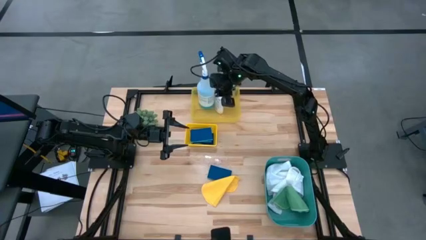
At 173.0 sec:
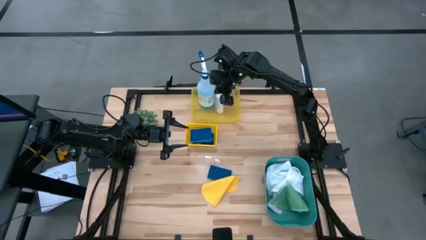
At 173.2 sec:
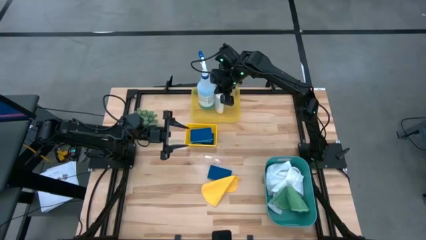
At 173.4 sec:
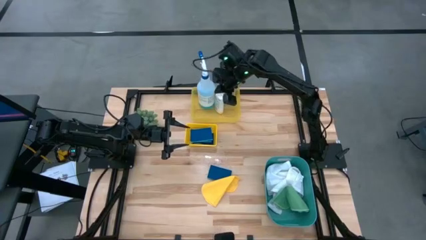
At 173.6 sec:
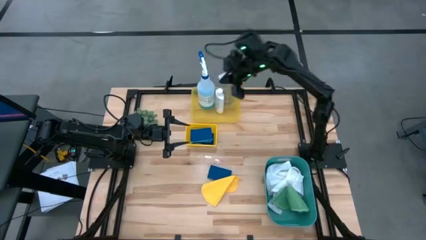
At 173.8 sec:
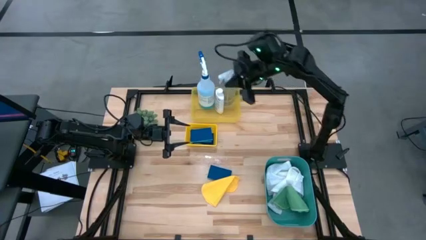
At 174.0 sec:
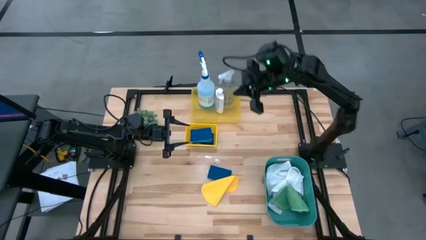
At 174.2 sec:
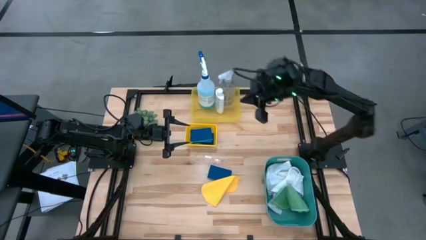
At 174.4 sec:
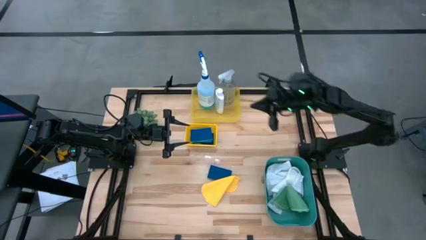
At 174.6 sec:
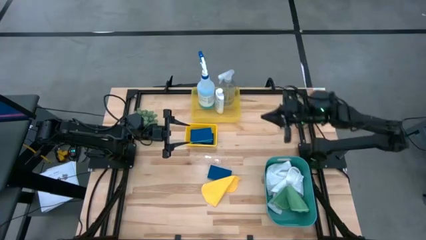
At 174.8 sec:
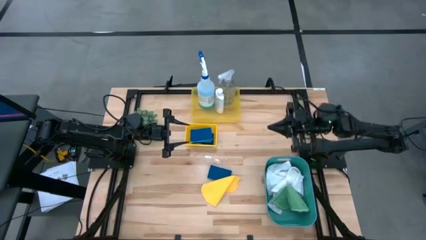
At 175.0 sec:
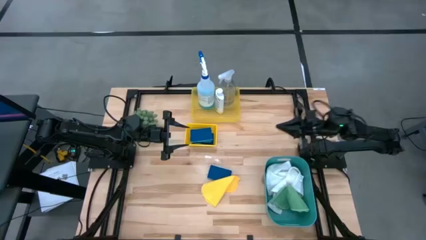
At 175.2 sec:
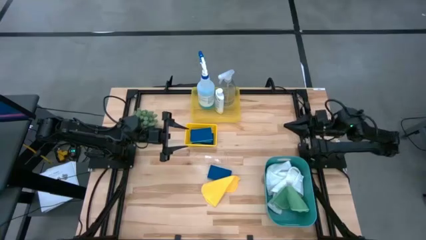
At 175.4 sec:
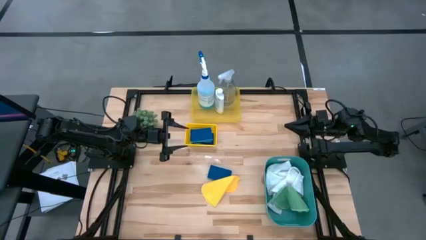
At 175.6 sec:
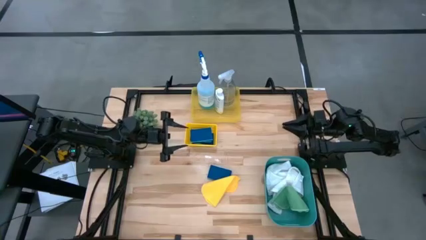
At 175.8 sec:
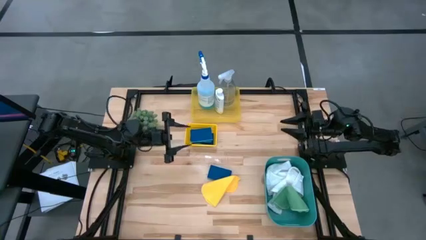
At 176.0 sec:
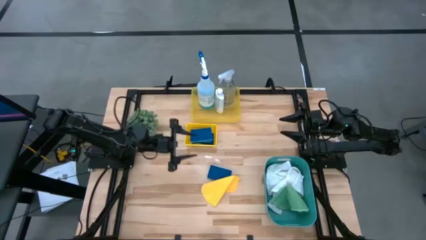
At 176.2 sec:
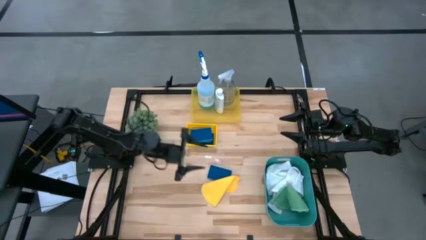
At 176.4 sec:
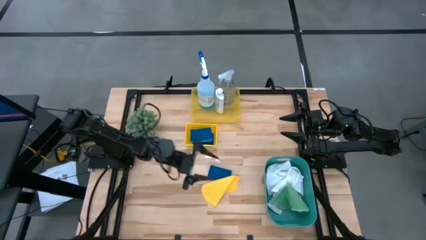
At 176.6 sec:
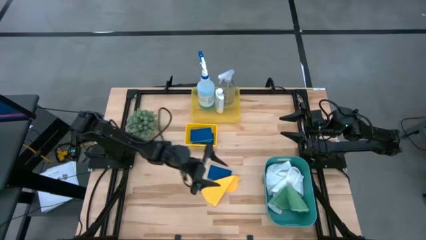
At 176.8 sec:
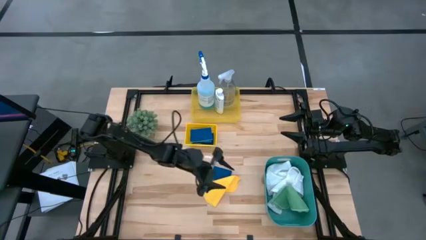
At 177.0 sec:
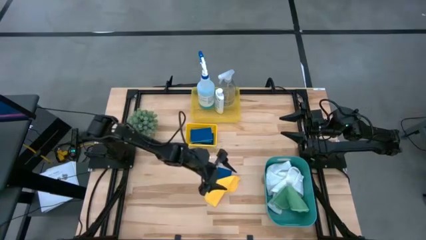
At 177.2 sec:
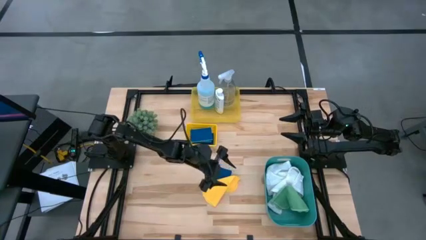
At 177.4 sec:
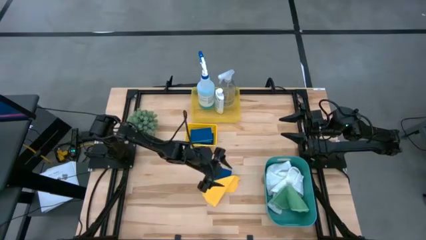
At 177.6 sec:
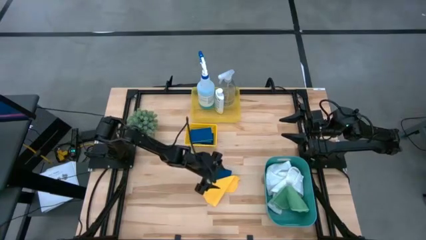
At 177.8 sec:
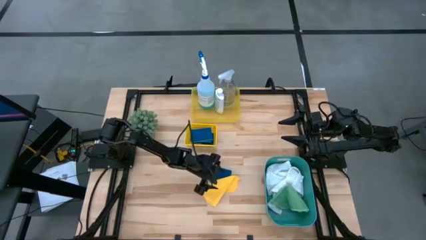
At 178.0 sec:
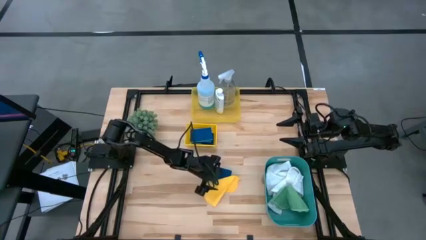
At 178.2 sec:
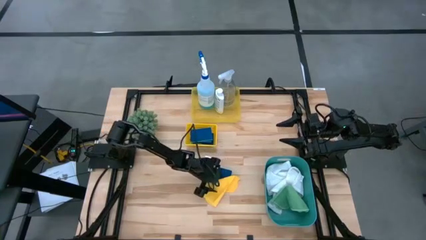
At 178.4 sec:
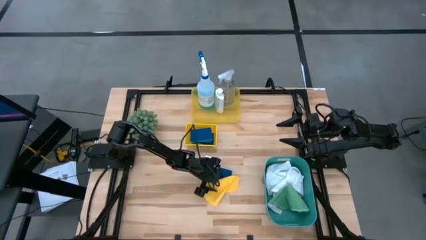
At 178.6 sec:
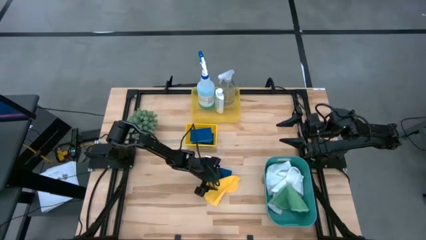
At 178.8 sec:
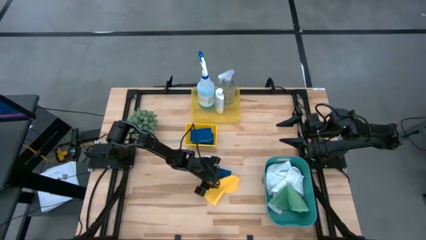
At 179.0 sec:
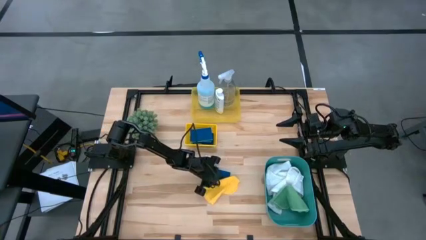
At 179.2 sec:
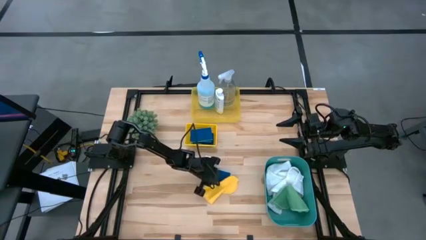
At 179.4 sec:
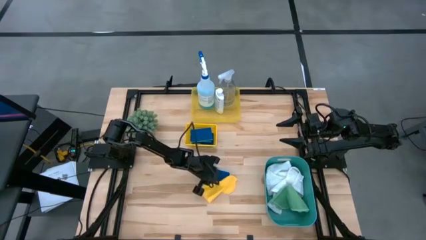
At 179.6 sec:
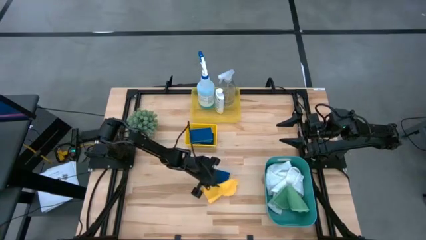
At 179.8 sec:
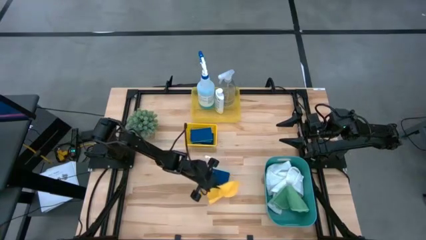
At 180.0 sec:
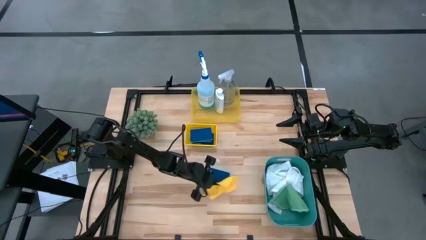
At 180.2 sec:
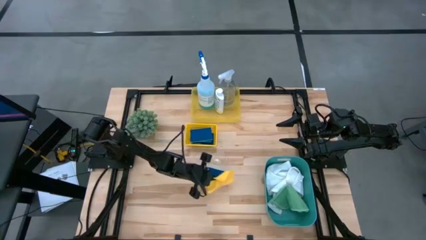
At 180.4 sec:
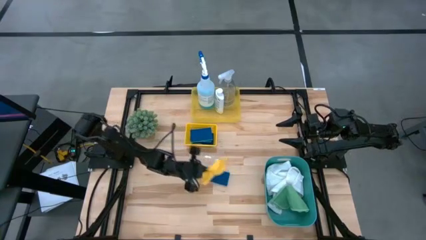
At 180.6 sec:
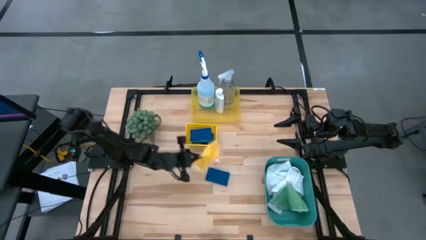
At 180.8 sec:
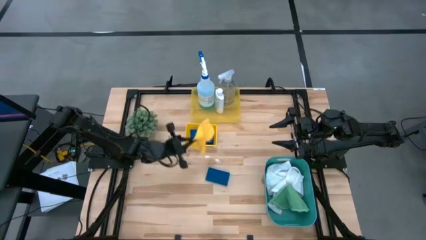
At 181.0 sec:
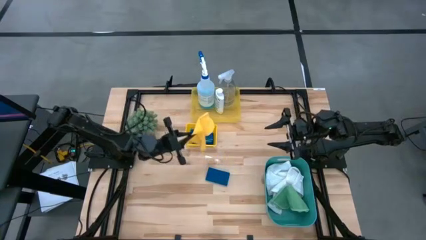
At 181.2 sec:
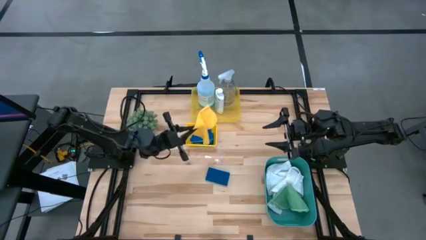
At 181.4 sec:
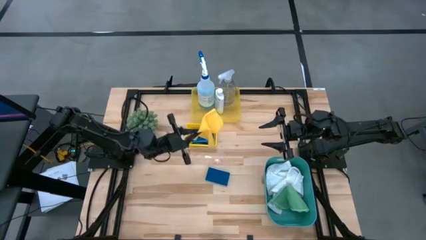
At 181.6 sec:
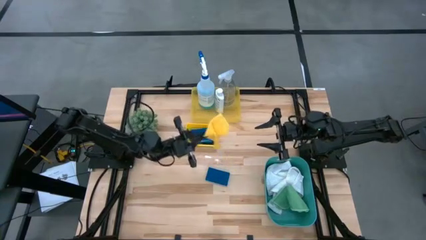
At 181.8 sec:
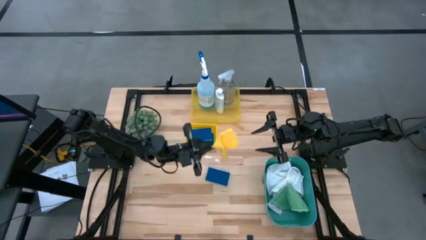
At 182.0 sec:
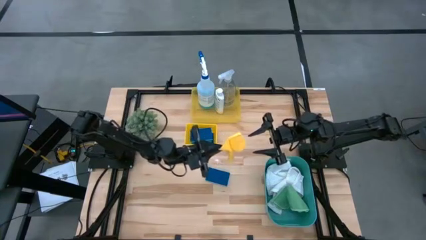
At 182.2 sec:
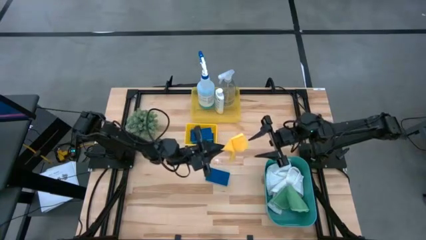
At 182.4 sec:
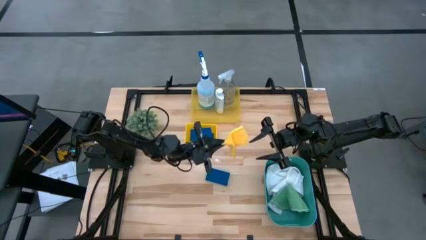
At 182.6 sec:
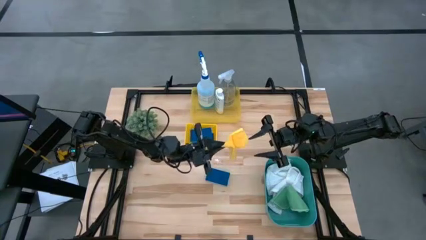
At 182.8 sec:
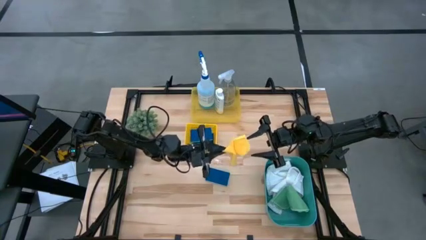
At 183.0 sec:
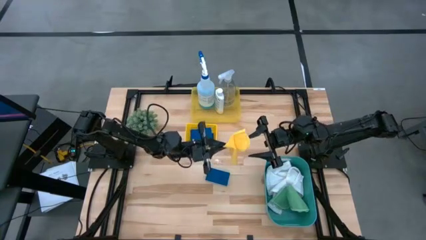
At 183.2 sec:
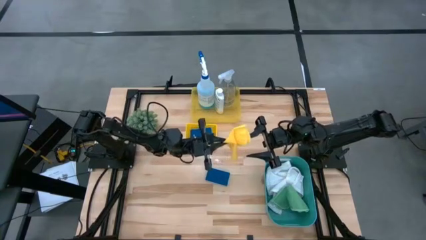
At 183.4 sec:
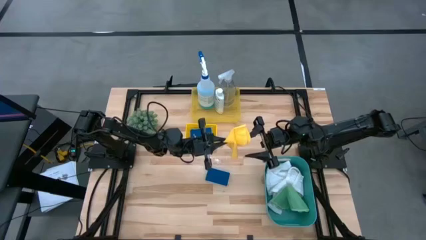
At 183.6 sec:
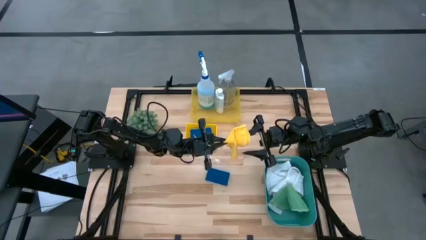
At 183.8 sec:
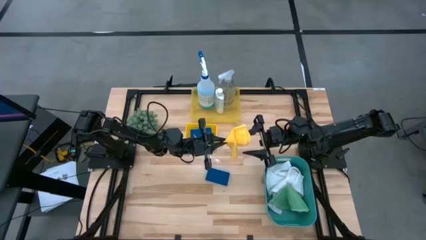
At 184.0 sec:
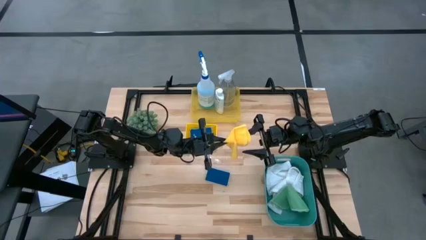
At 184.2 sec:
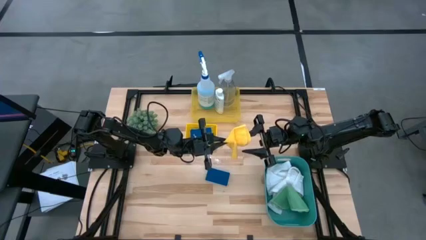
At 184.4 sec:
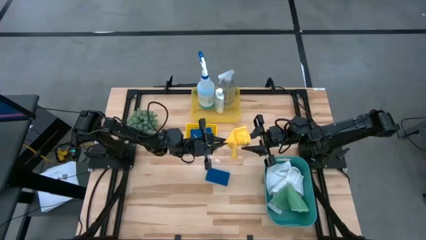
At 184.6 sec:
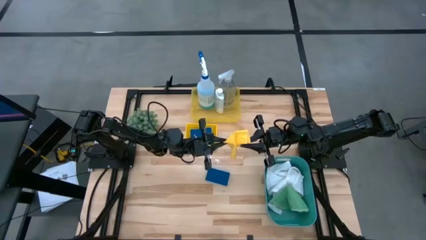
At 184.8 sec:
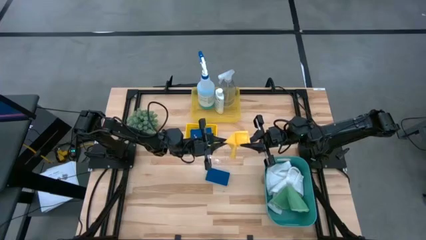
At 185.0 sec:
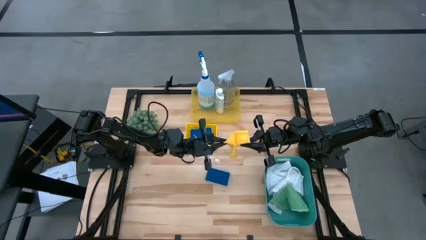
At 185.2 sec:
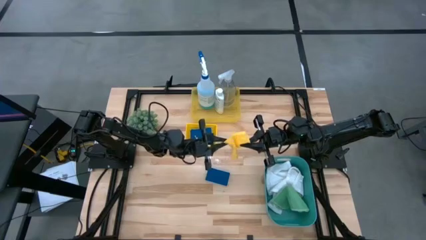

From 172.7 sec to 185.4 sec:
Task: Pick & Place Kitchen Items
Put the yellow cloth into the green bin
